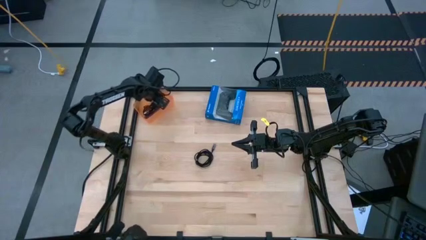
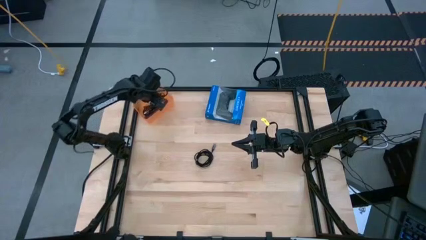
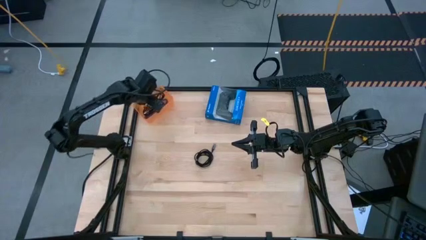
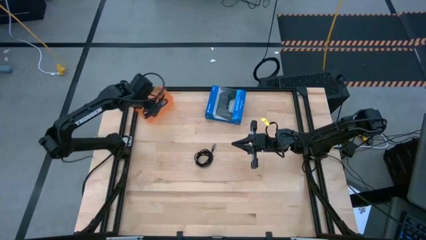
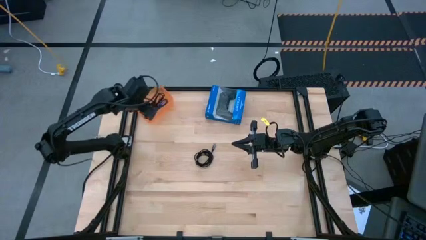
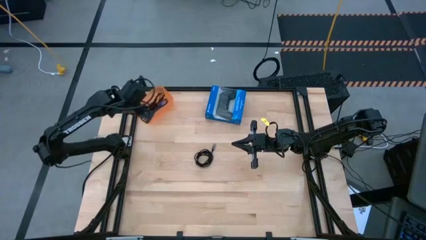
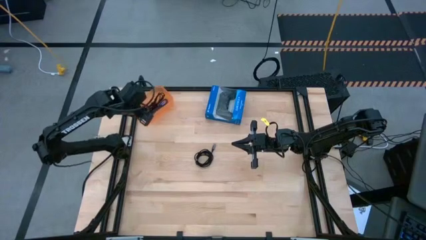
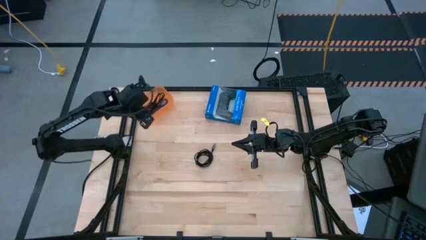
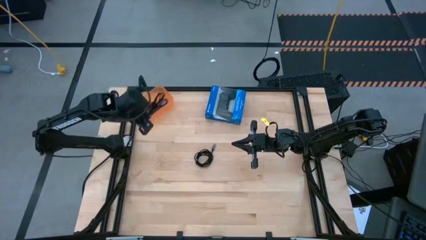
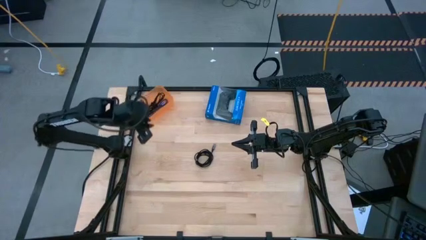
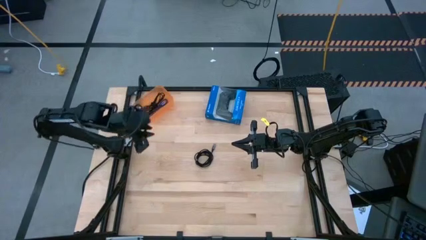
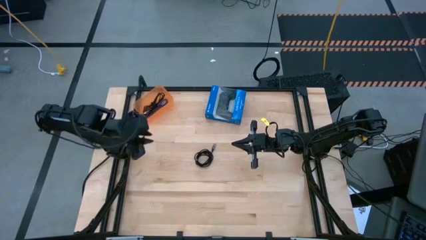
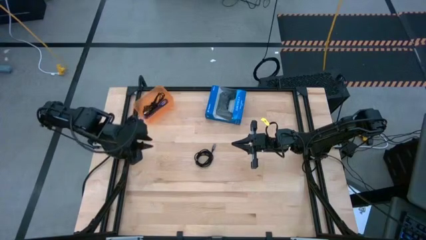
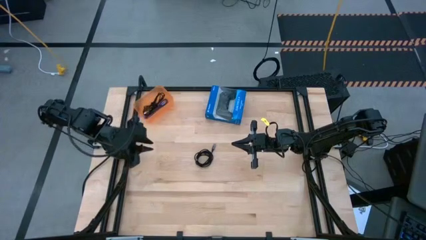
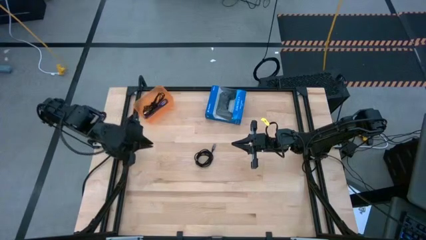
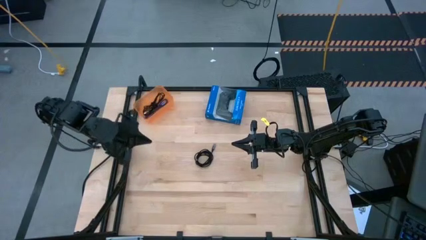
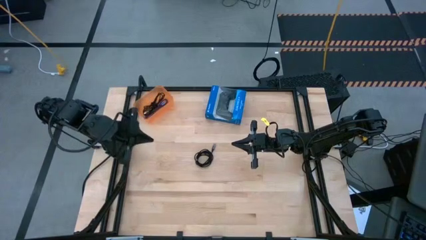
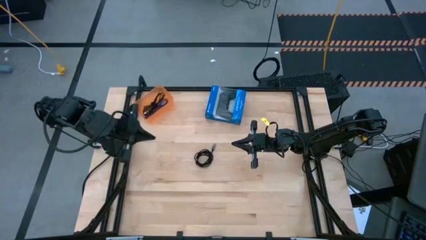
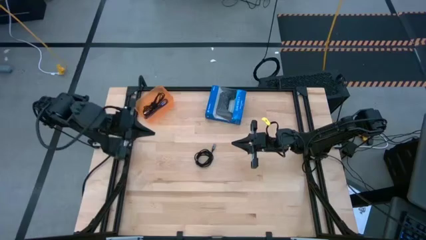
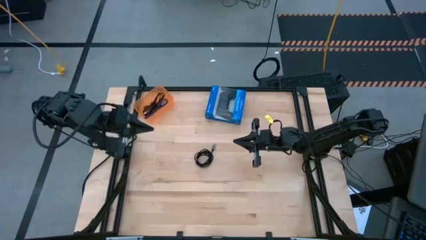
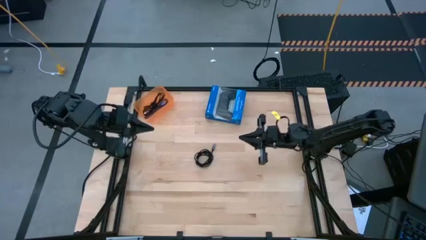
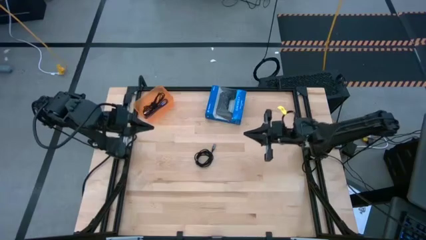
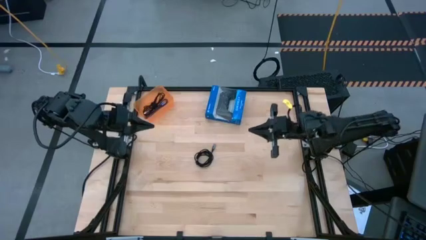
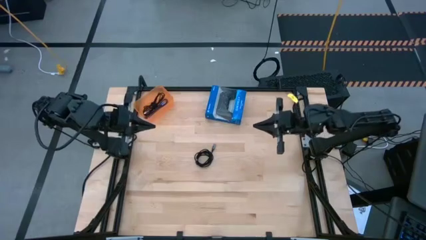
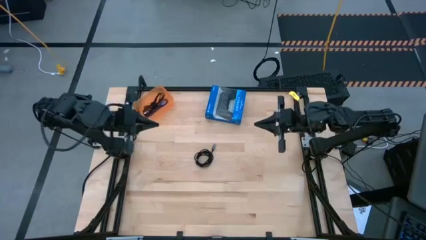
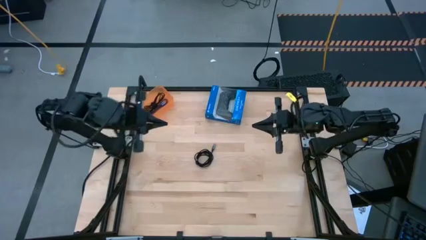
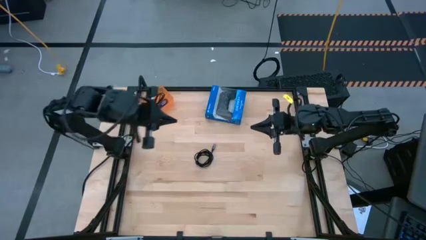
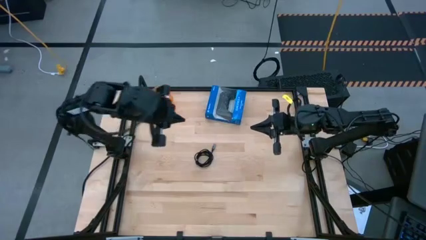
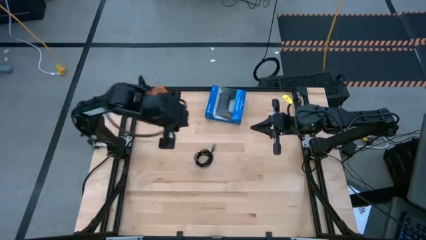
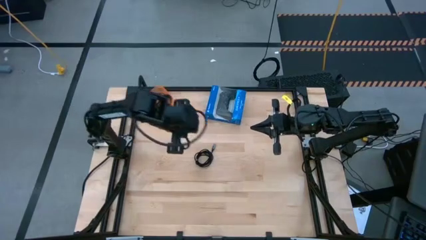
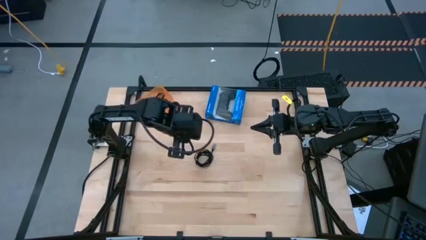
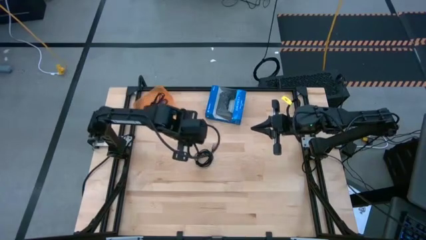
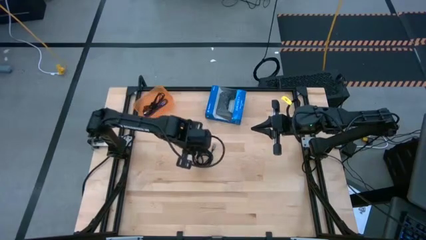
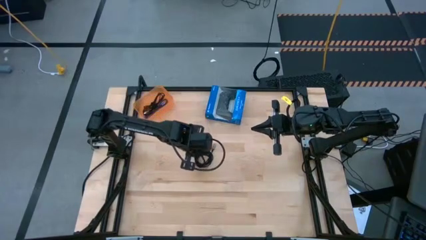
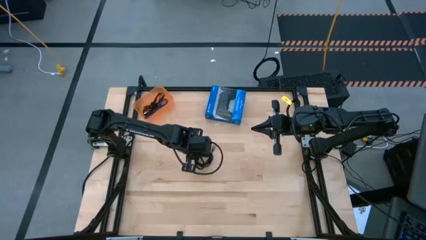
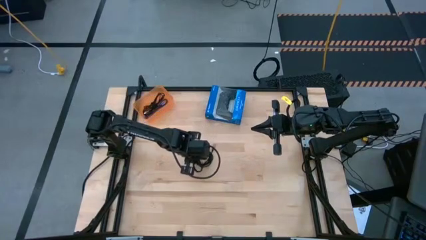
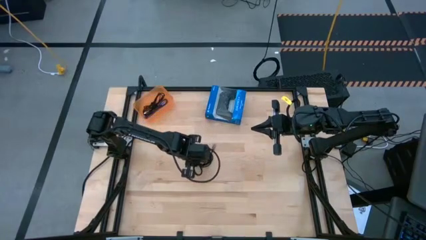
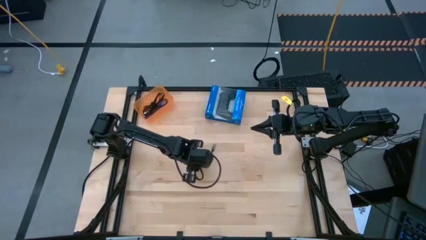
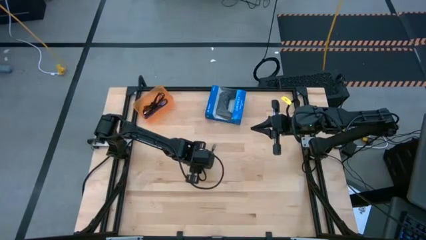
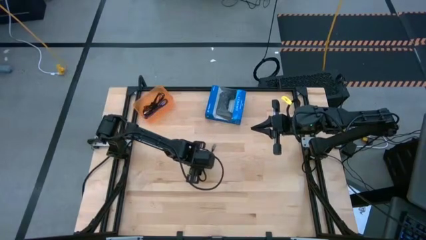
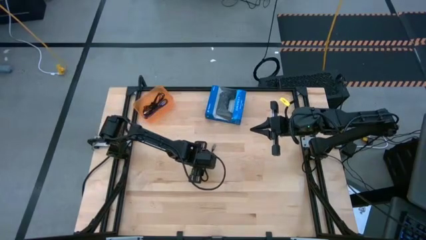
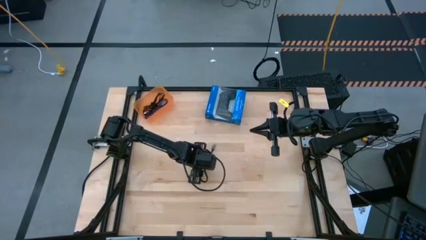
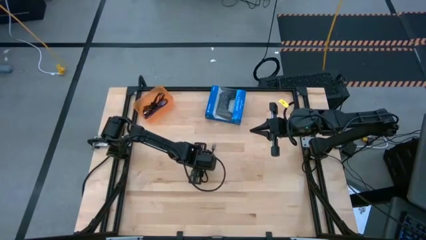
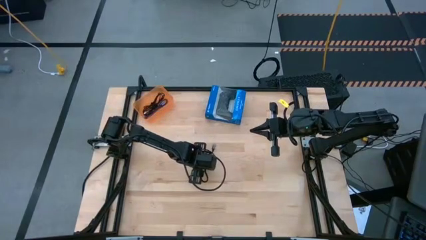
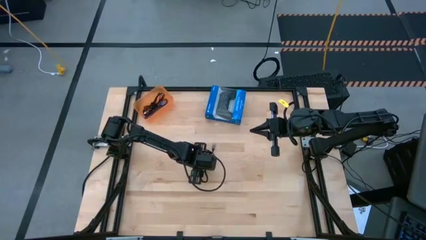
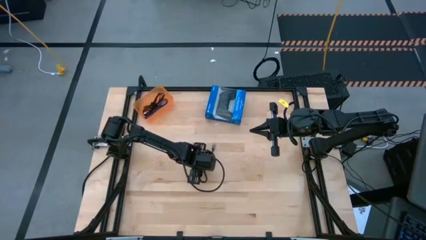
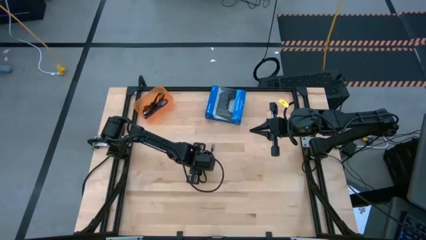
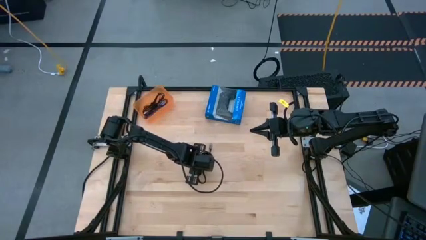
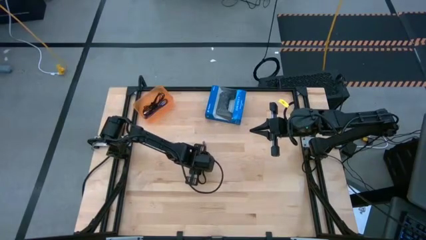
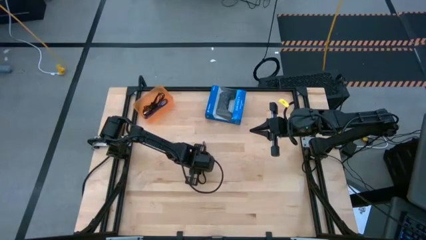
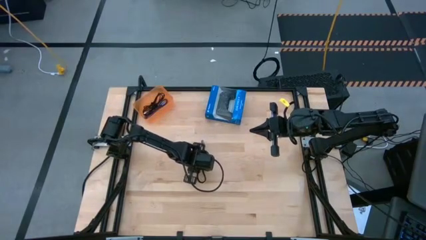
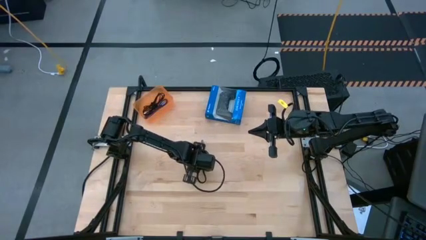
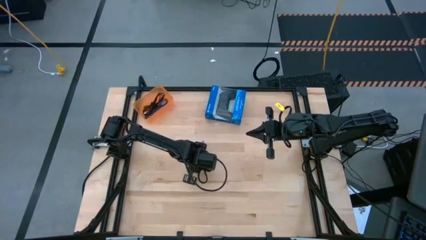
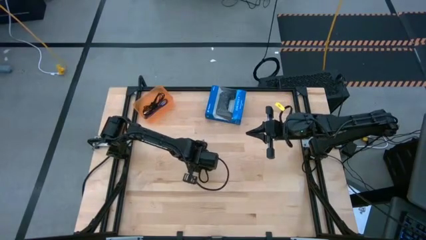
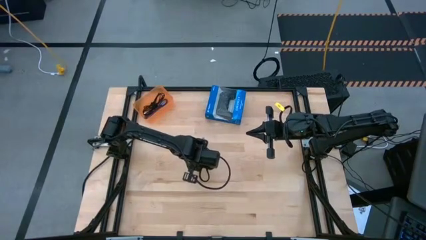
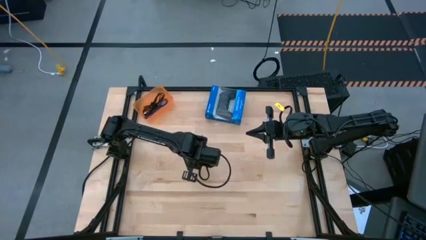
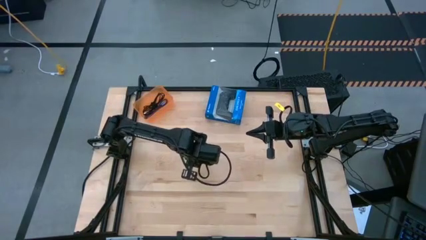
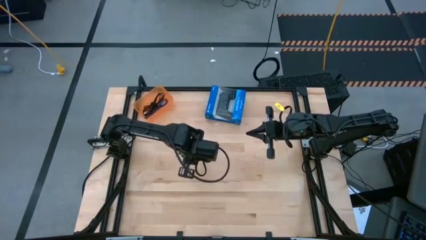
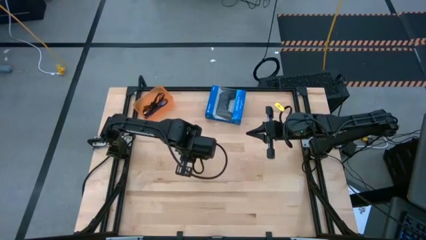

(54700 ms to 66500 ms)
Task: Pick and place USB-C Cables
Put the black charger cable into the orange bin

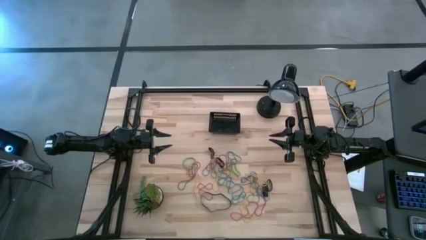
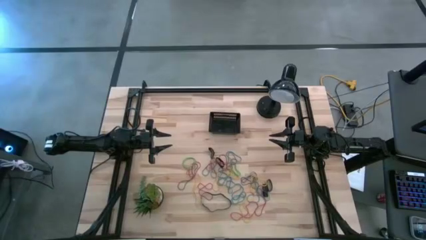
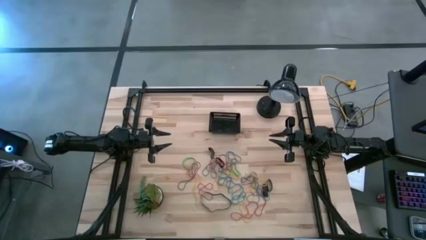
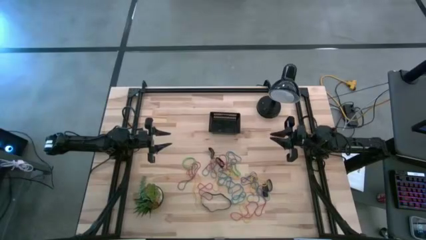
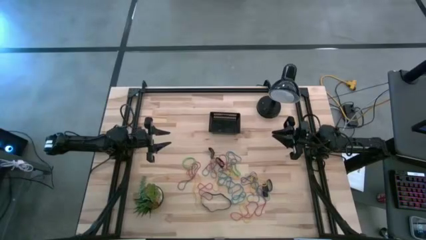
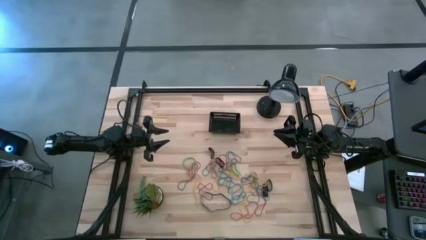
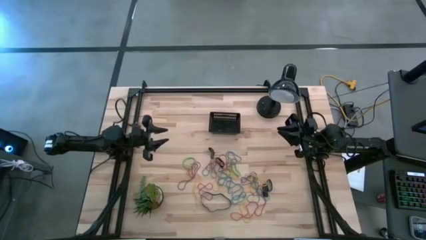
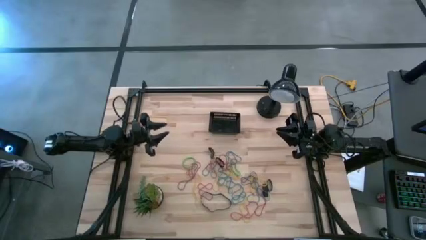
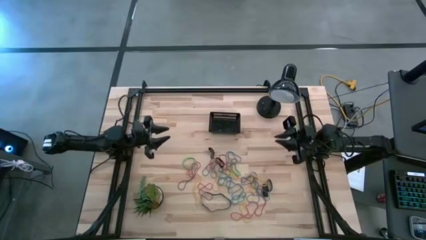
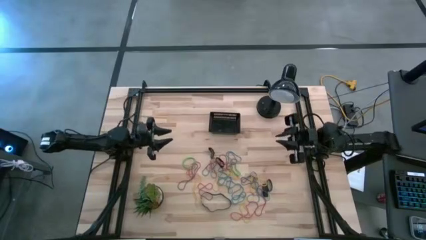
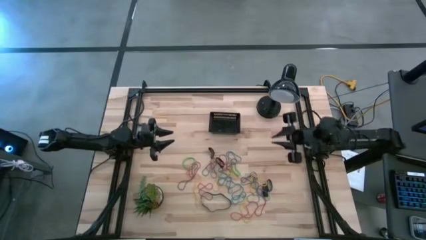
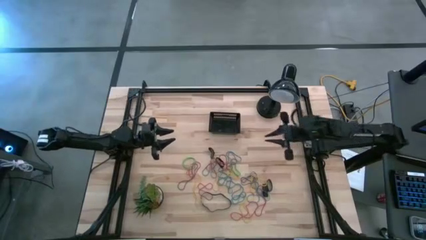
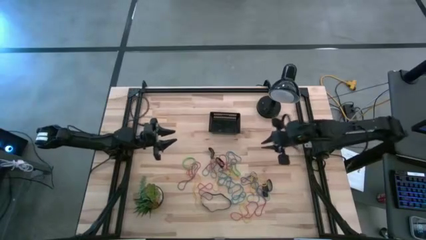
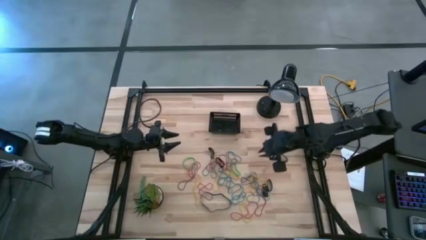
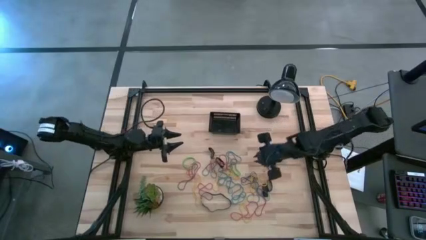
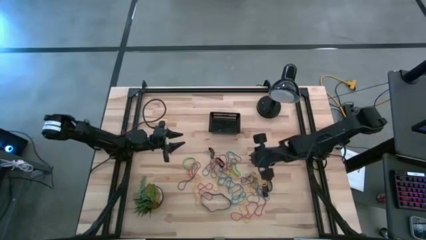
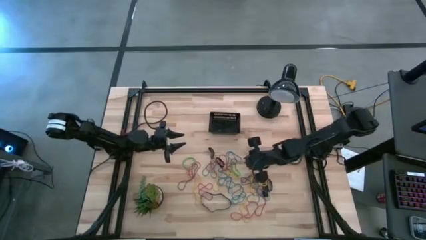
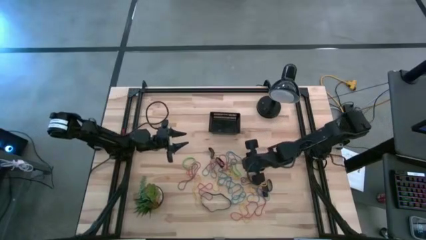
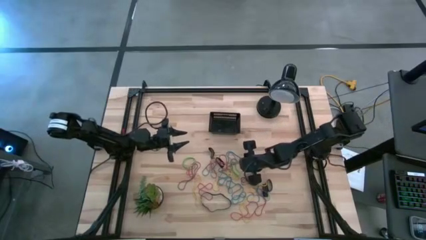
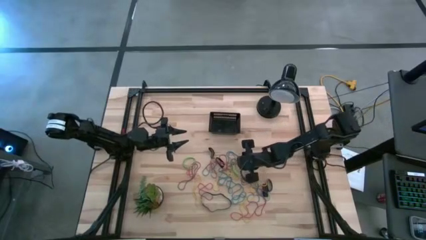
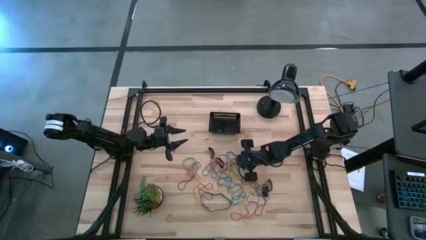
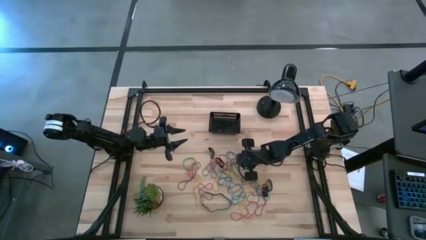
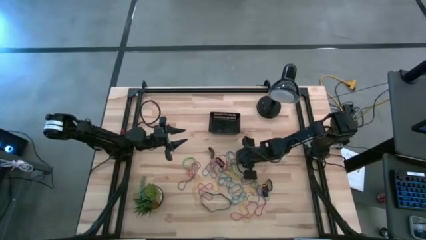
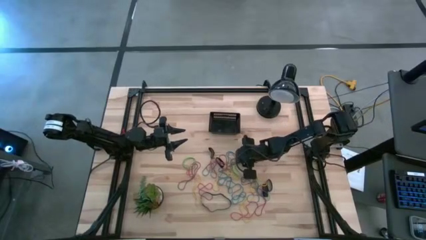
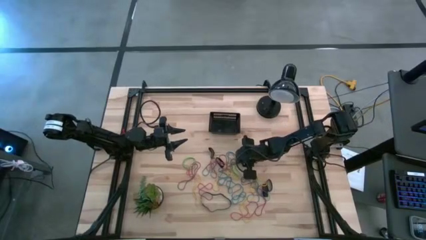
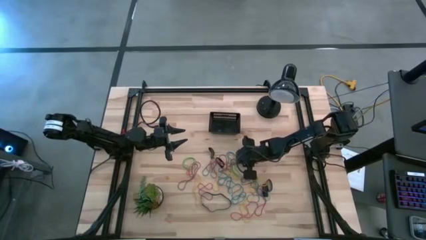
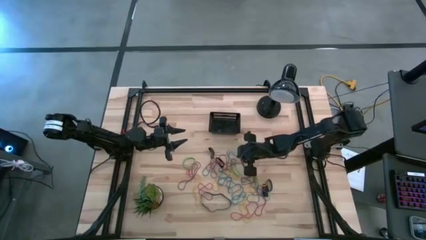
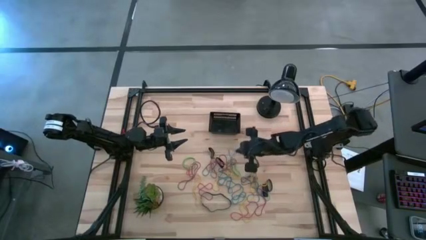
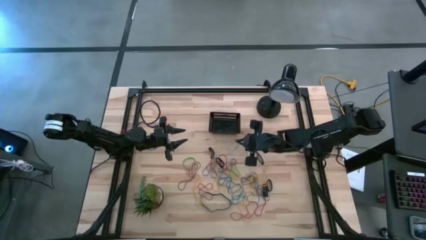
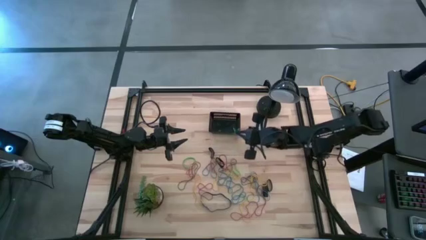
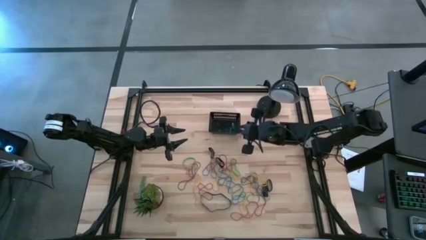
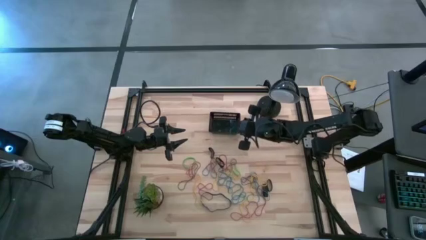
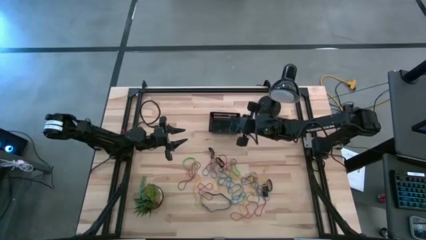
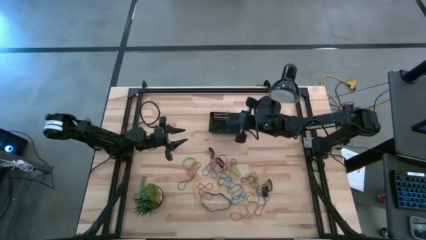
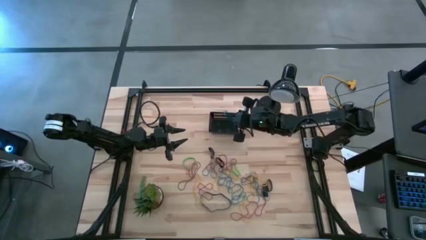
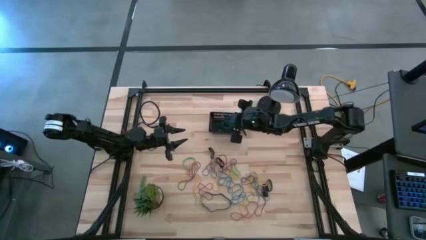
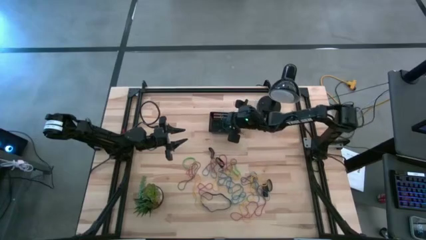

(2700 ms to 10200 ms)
Task: Pick and place rubber bands into bin
Put the blue rubber band into the basket
